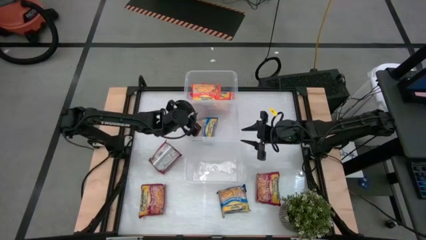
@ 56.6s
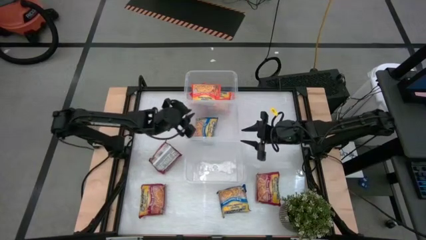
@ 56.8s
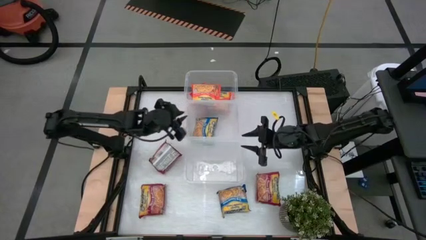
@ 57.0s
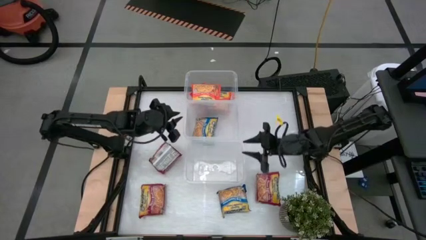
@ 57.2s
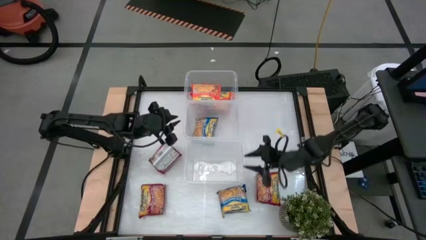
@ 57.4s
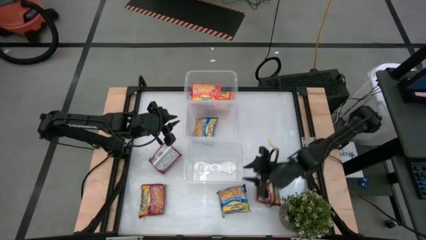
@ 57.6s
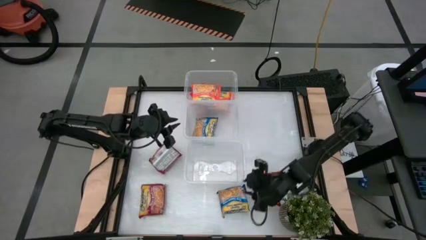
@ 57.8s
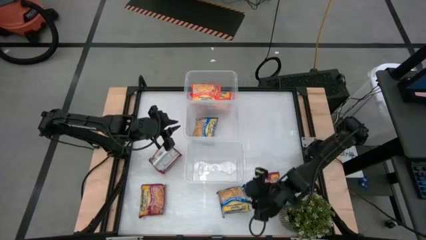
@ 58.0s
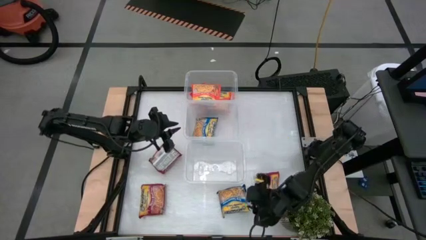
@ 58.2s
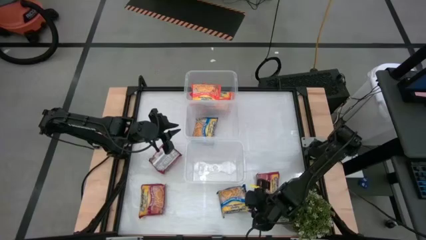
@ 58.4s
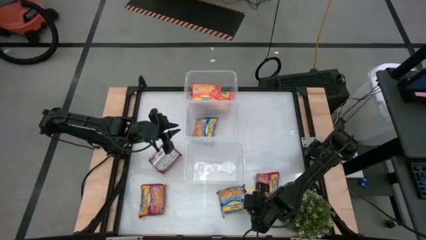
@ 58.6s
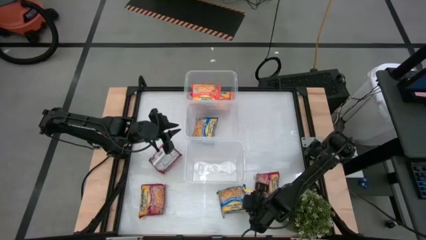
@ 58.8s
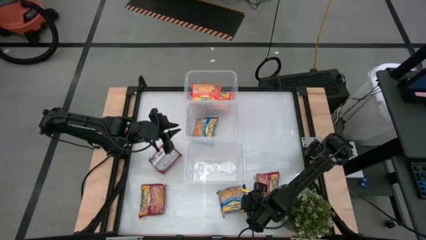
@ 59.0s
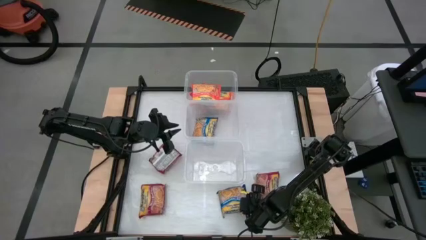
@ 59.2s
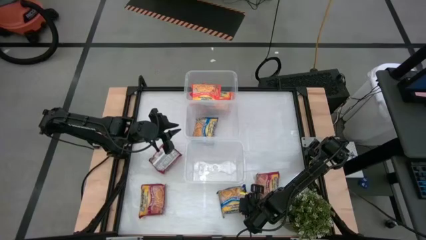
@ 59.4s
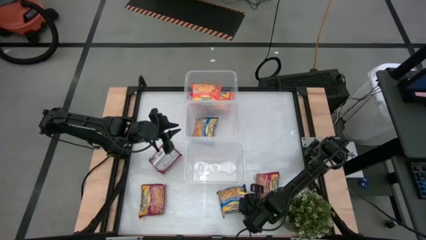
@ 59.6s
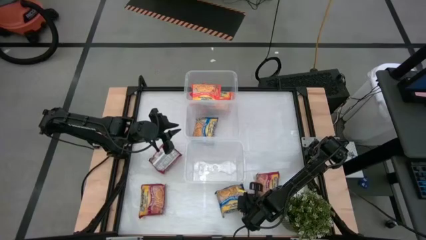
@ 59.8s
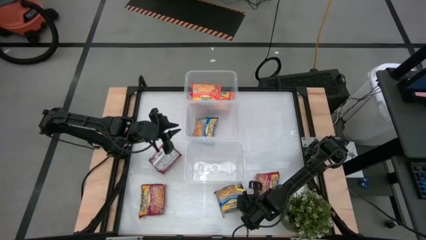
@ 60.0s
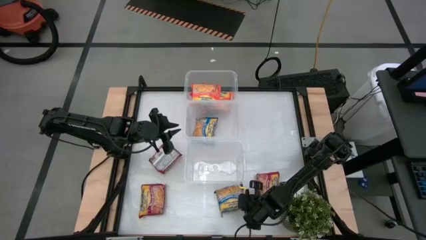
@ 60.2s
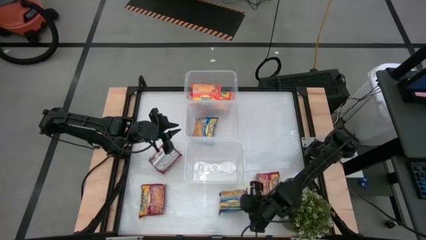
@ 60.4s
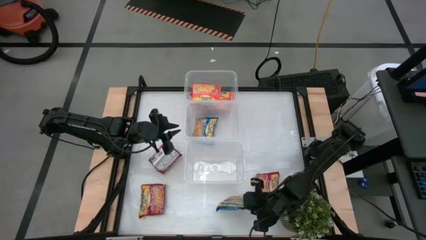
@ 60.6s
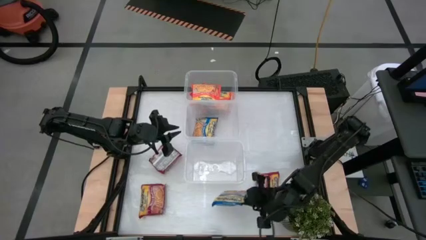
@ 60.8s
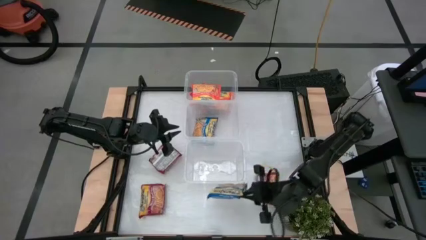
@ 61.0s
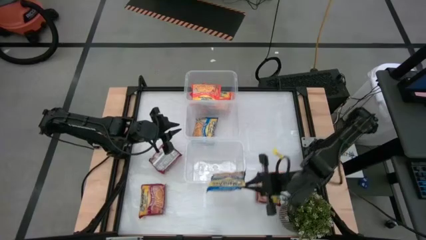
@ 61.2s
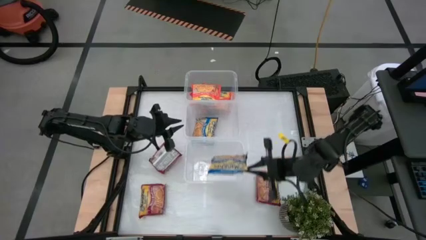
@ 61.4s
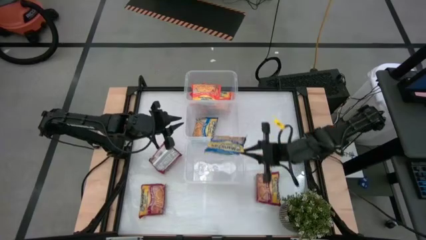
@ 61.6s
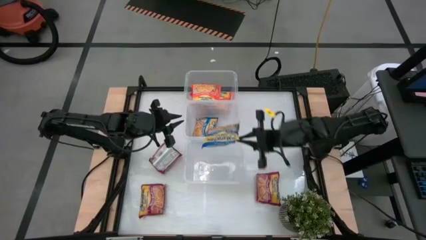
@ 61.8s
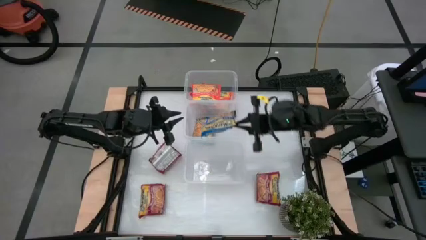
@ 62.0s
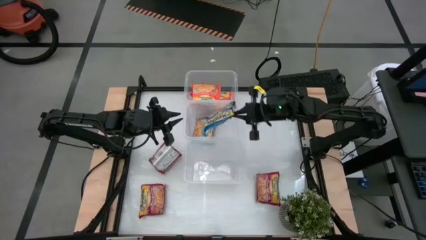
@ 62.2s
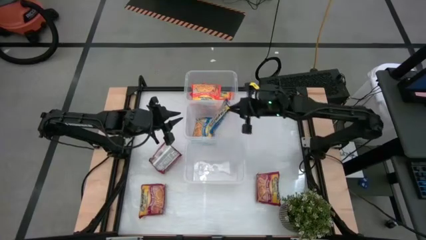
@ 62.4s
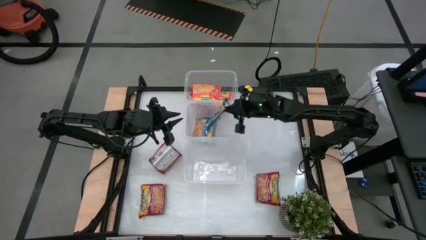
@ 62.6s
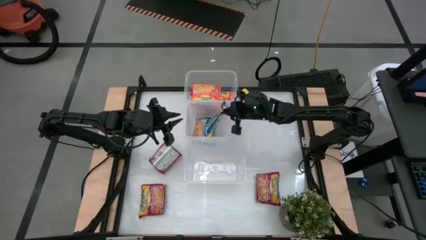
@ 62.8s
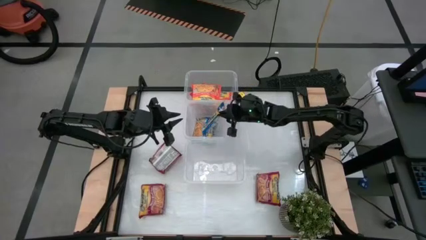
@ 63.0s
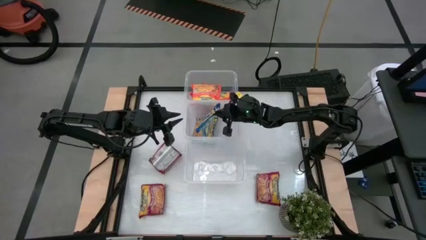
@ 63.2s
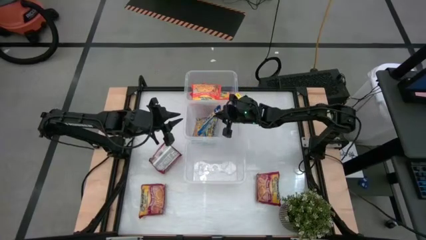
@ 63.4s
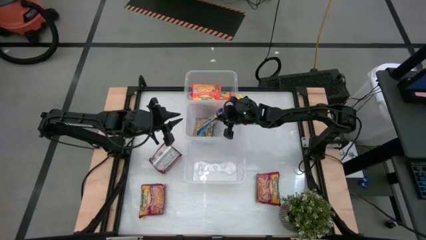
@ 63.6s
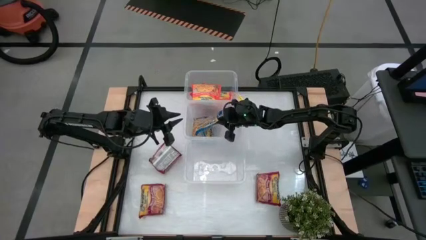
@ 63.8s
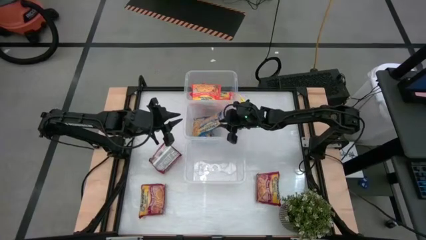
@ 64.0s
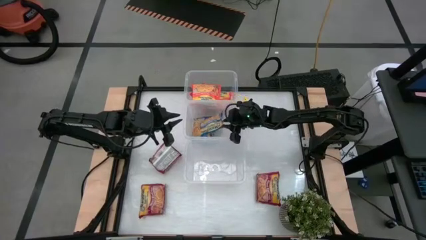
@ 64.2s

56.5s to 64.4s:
Task: Sort Maruchan noodles
Put the blue noodle pack into the middle transparent bin

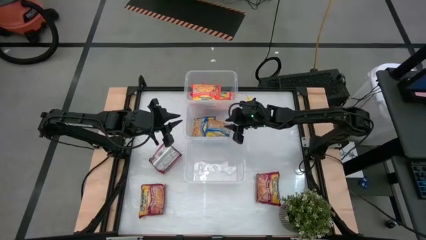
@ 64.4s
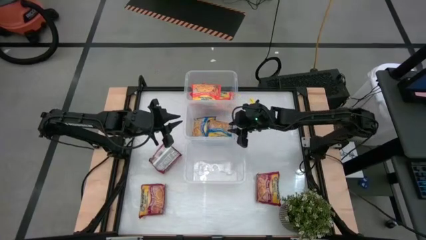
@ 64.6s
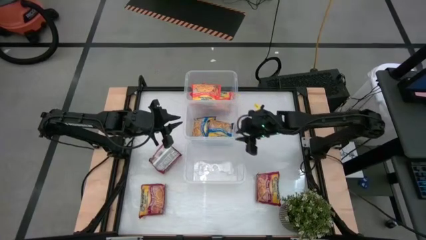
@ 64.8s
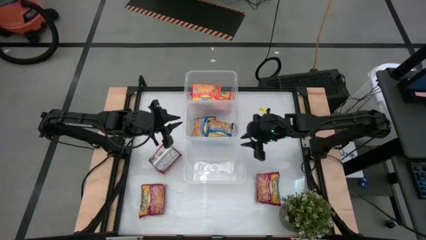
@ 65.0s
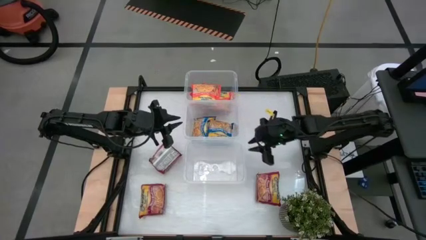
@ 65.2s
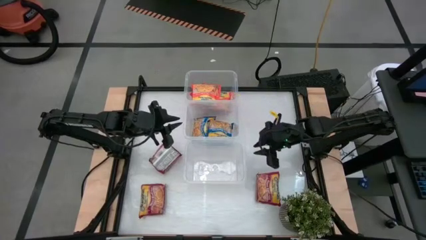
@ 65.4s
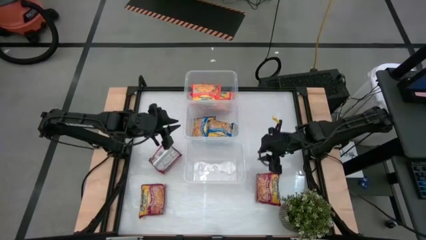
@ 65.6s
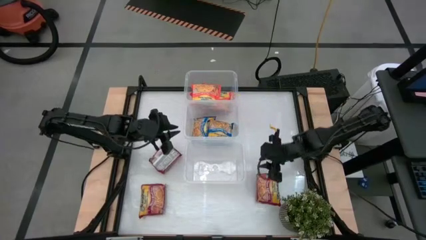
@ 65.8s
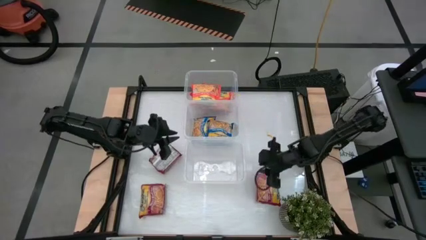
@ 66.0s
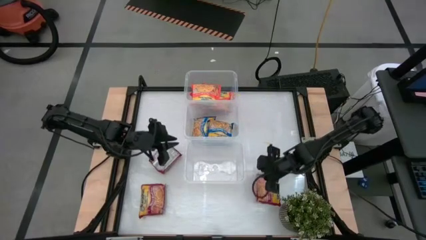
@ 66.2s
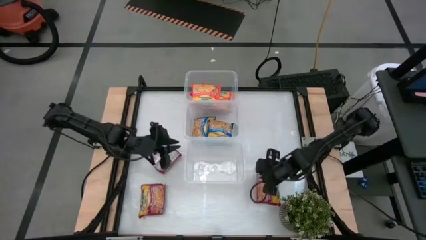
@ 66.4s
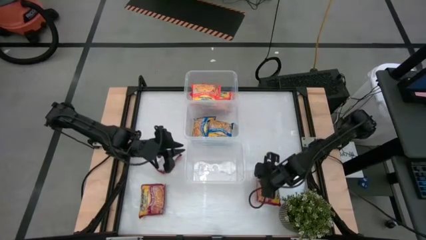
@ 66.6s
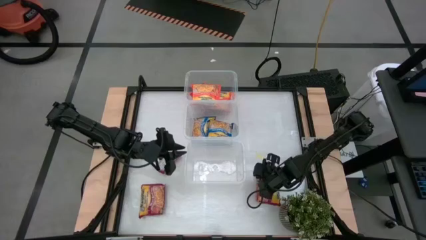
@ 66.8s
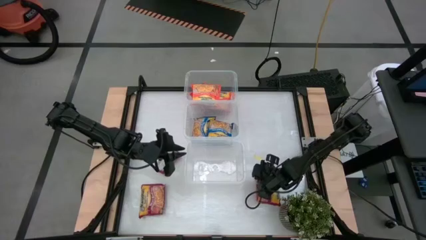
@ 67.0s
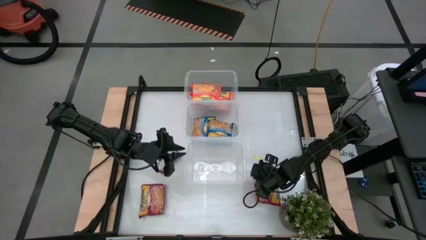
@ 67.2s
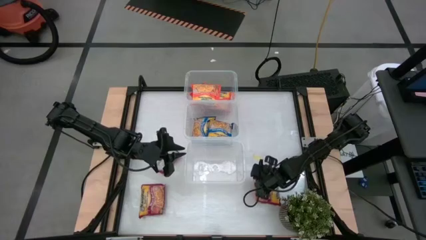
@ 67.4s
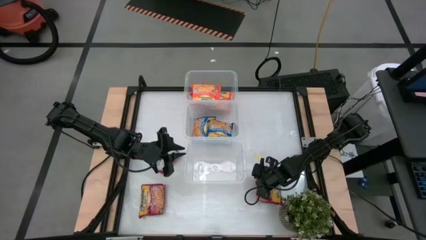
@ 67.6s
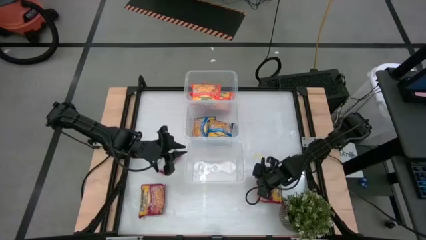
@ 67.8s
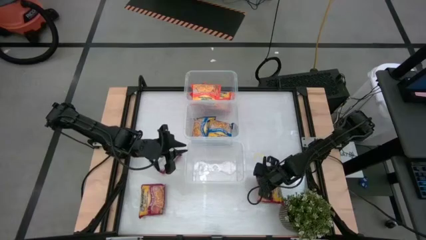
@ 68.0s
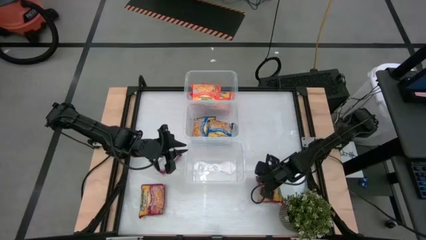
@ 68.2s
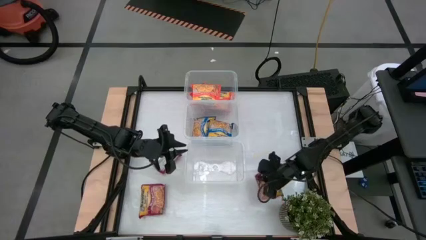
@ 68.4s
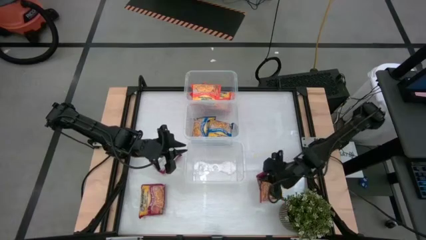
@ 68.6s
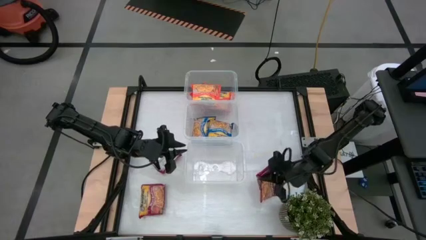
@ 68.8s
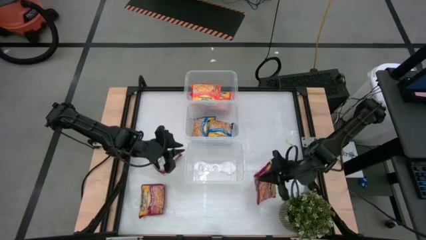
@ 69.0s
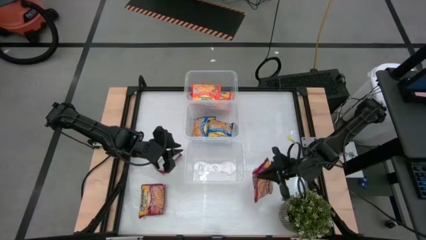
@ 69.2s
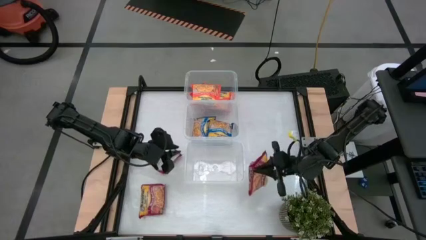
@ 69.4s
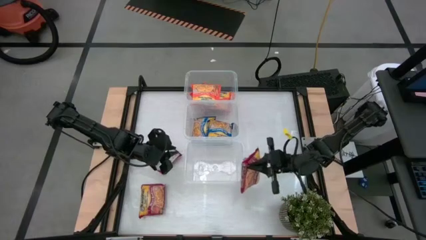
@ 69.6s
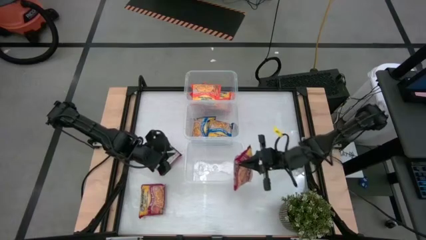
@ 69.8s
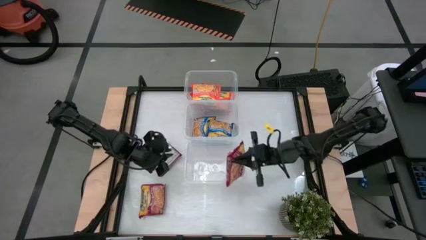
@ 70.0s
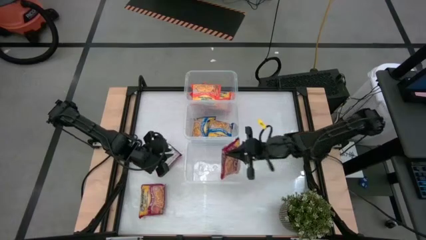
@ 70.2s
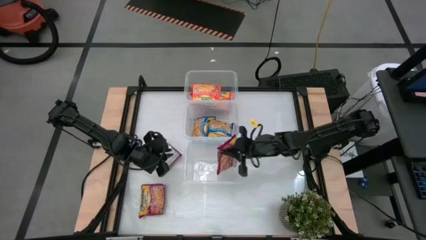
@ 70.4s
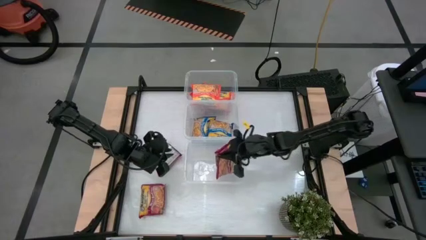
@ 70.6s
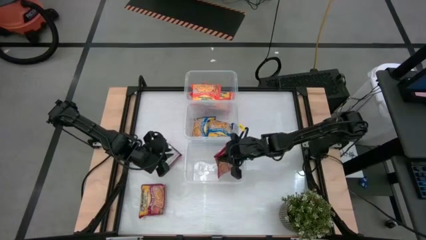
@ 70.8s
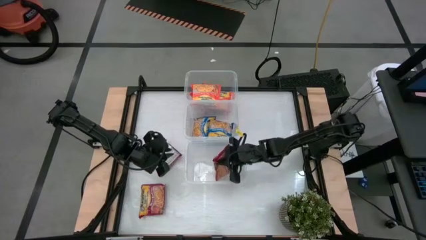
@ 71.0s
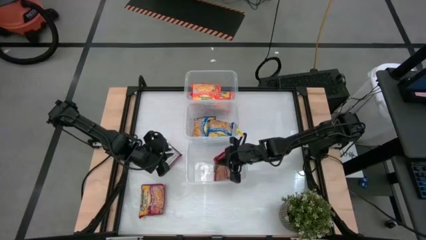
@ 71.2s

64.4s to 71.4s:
Put the right red noodle pack into the bottom transparent bin

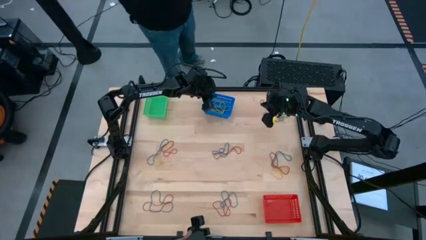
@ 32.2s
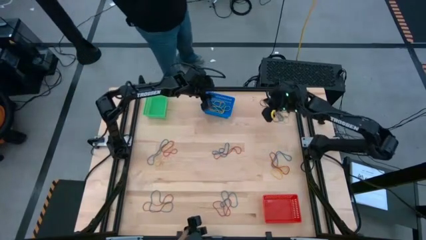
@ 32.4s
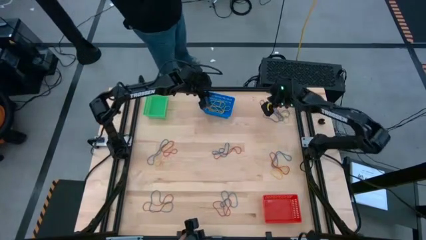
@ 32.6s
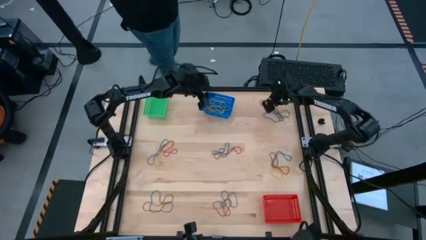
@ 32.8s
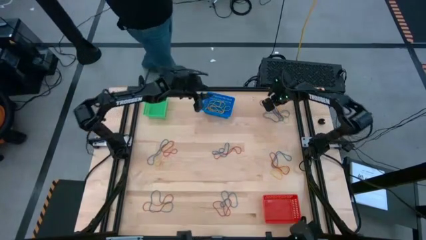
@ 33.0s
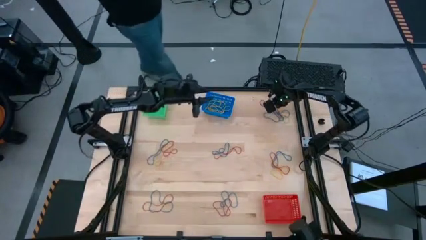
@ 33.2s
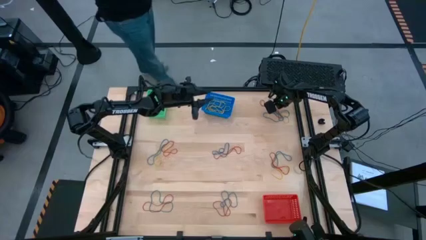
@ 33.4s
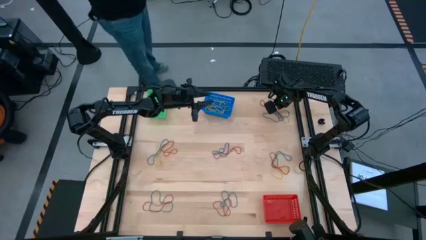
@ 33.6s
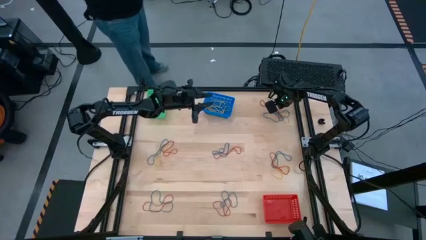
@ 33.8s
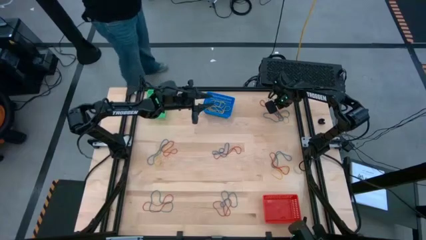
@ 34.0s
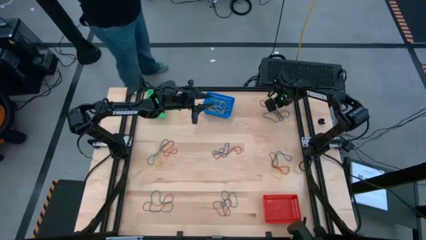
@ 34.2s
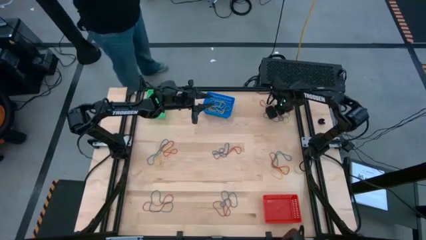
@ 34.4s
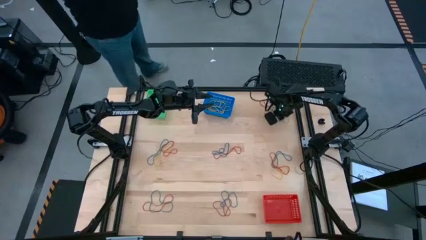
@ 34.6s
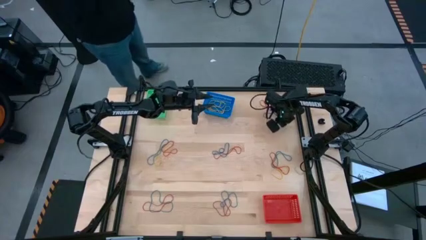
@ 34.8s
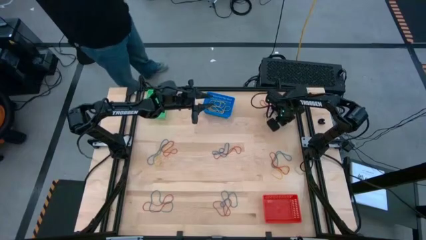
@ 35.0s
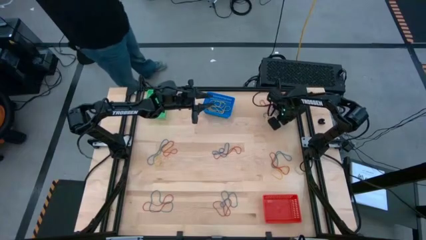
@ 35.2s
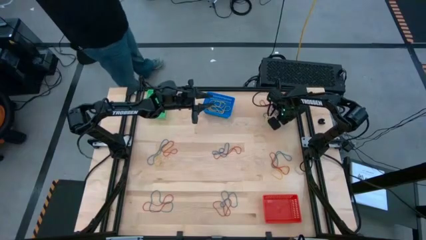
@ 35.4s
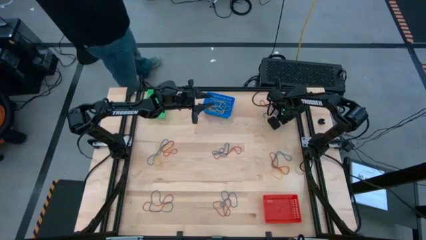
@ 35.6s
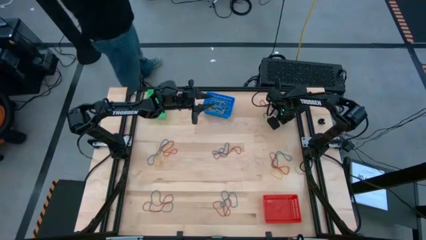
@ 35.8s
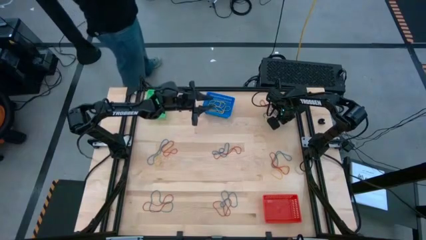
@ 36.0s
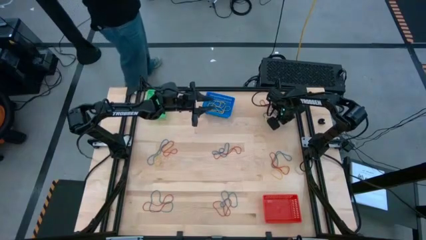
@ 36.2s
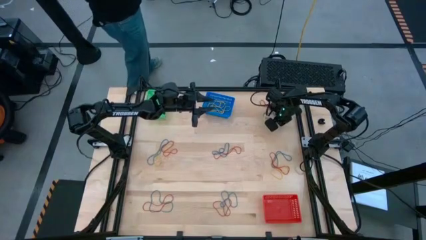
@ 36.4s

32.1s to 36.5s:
Task: Sort rubber bands into baskets
Put the yellow rubber band into the blue bin
